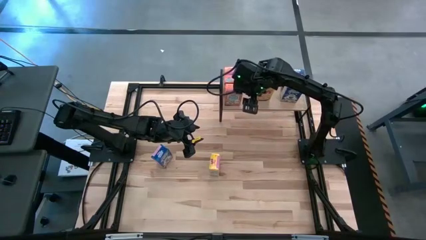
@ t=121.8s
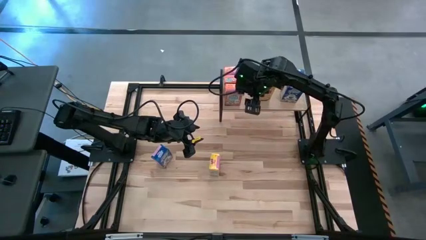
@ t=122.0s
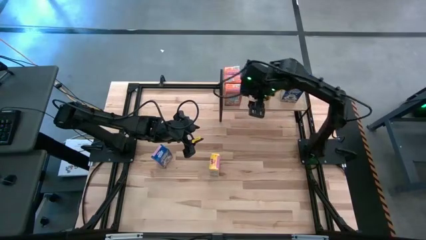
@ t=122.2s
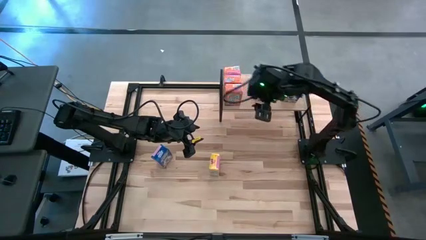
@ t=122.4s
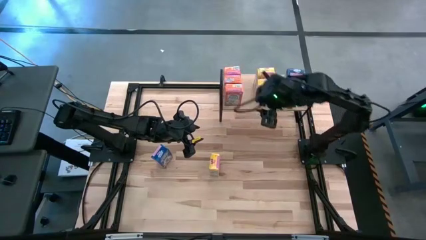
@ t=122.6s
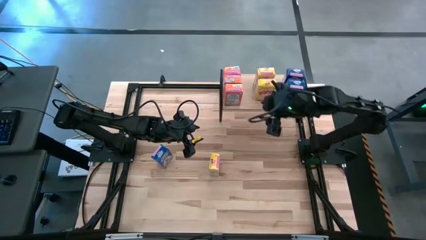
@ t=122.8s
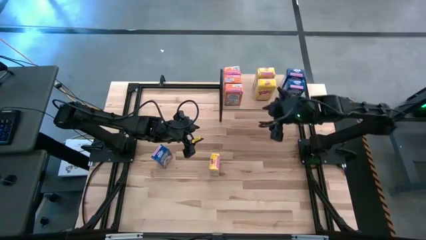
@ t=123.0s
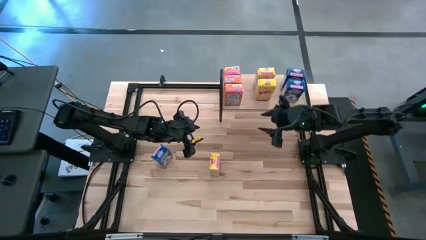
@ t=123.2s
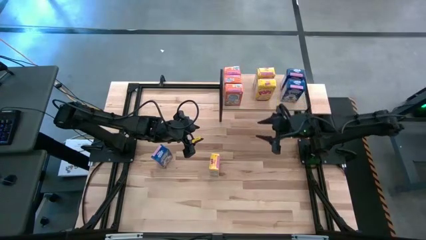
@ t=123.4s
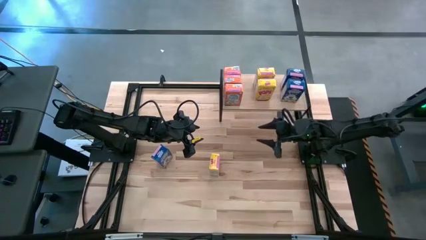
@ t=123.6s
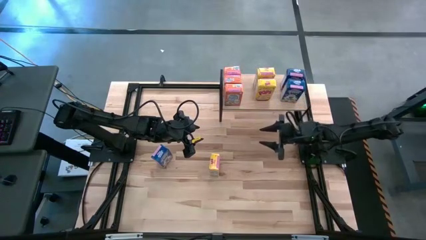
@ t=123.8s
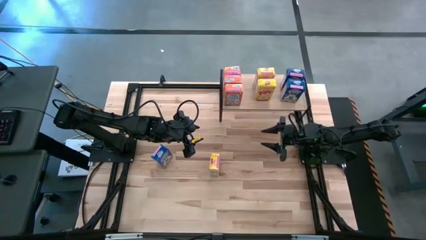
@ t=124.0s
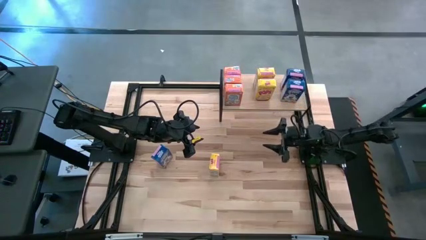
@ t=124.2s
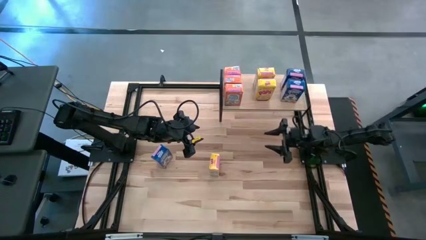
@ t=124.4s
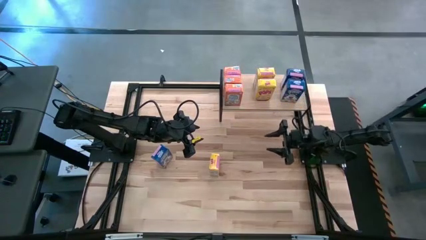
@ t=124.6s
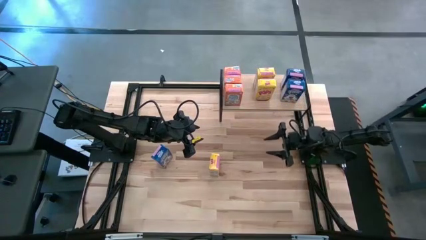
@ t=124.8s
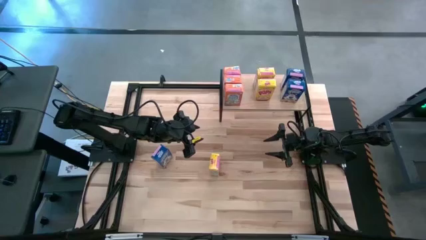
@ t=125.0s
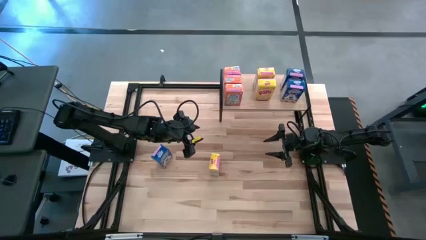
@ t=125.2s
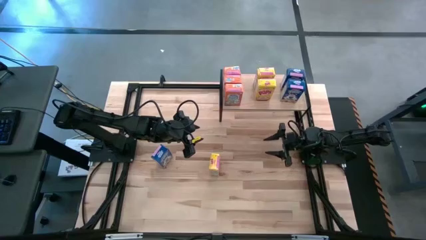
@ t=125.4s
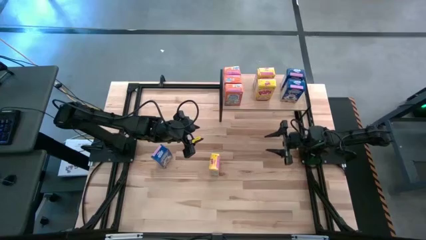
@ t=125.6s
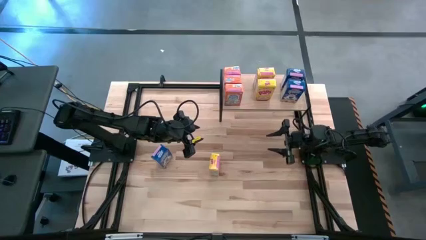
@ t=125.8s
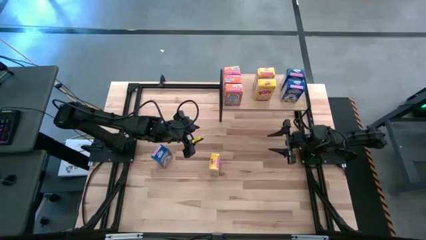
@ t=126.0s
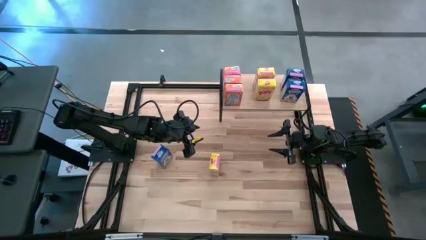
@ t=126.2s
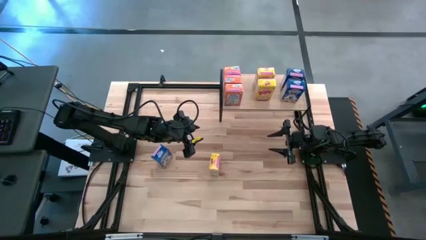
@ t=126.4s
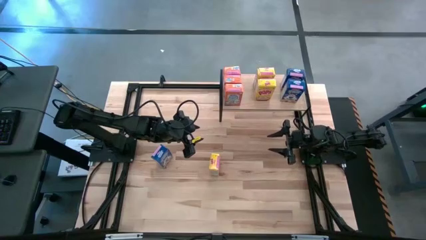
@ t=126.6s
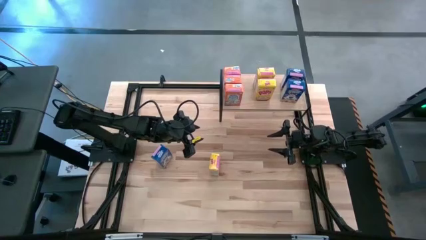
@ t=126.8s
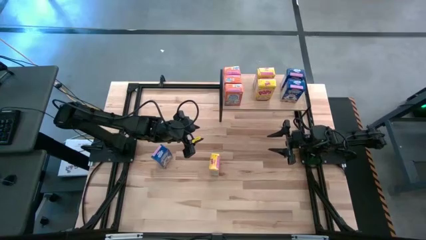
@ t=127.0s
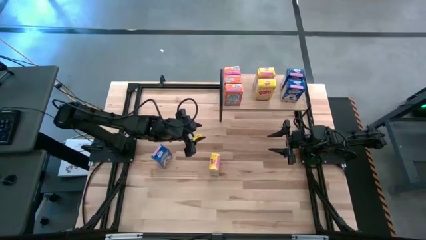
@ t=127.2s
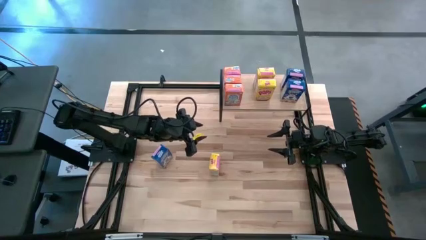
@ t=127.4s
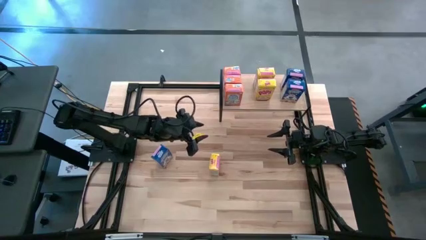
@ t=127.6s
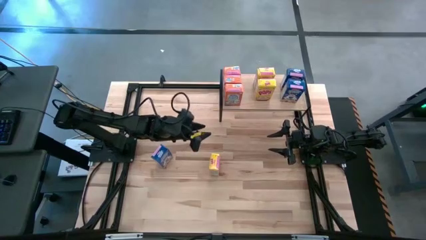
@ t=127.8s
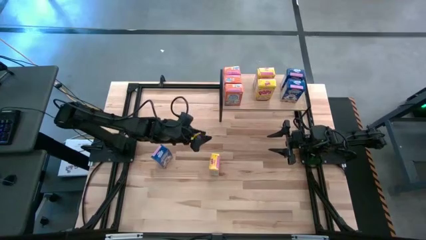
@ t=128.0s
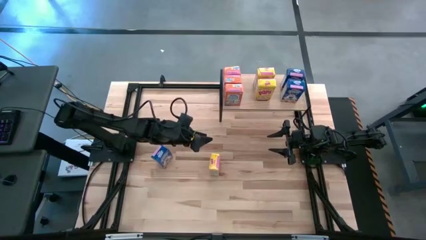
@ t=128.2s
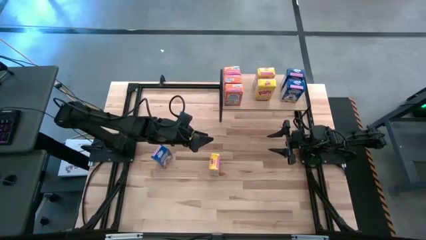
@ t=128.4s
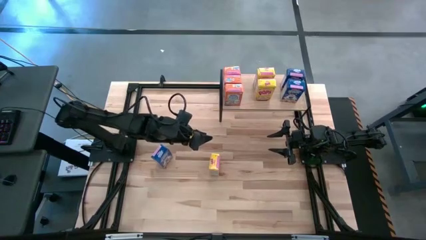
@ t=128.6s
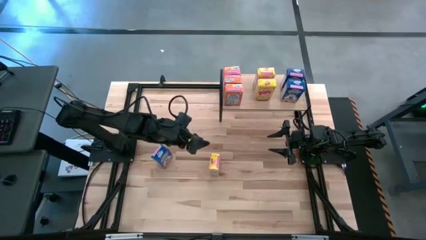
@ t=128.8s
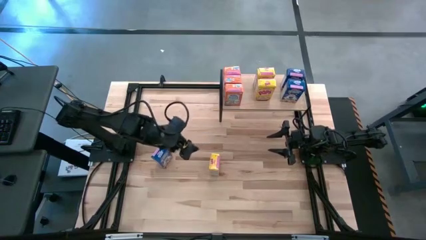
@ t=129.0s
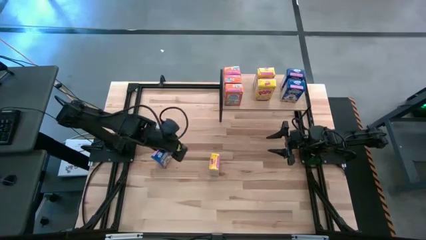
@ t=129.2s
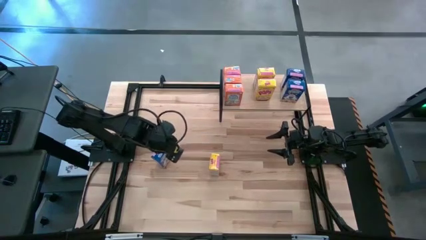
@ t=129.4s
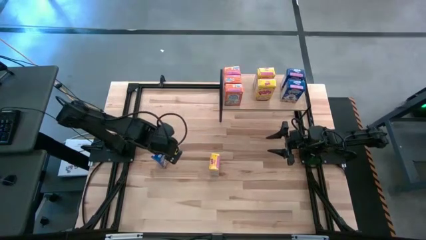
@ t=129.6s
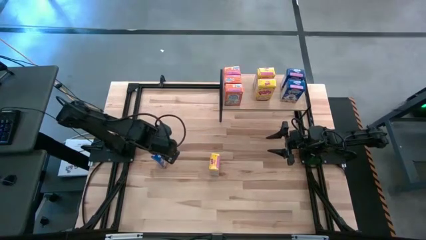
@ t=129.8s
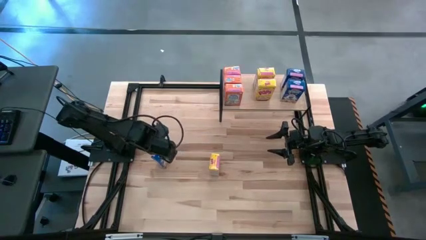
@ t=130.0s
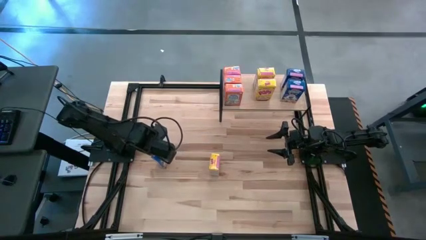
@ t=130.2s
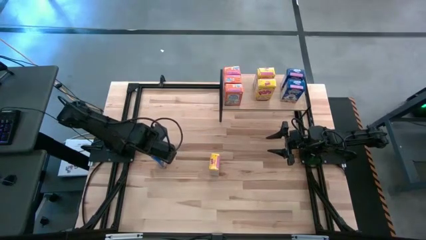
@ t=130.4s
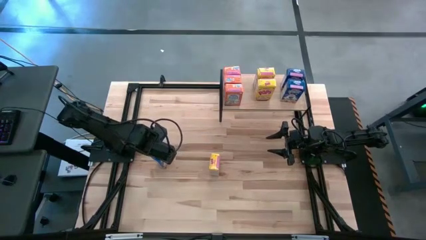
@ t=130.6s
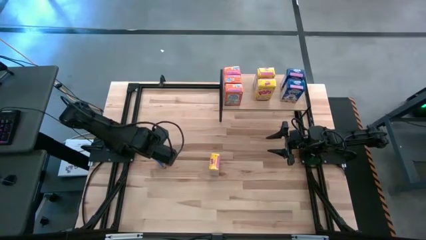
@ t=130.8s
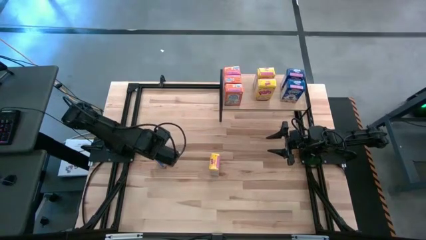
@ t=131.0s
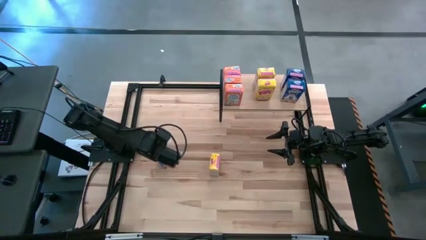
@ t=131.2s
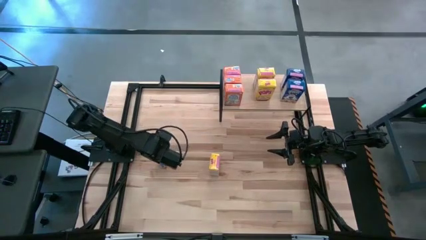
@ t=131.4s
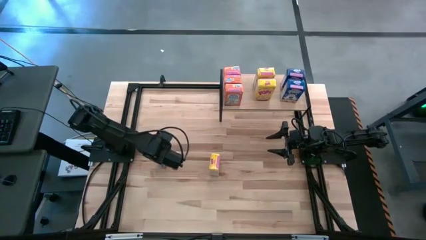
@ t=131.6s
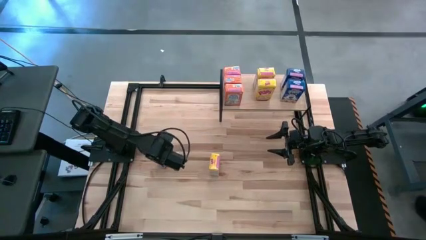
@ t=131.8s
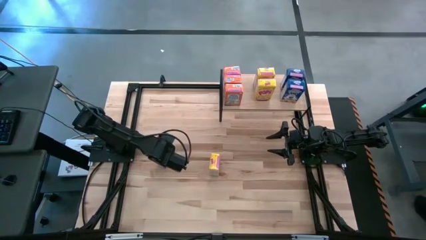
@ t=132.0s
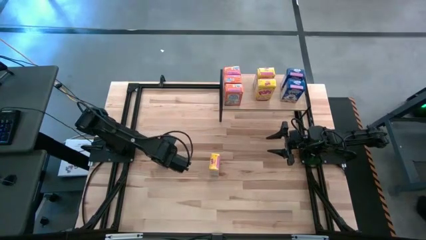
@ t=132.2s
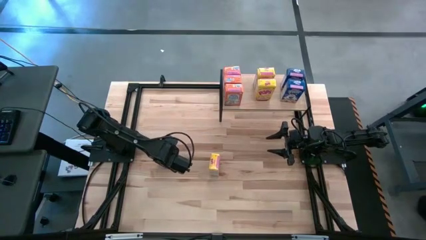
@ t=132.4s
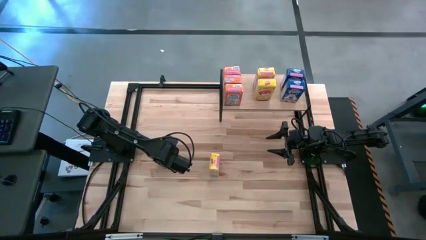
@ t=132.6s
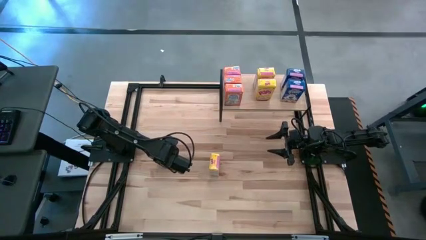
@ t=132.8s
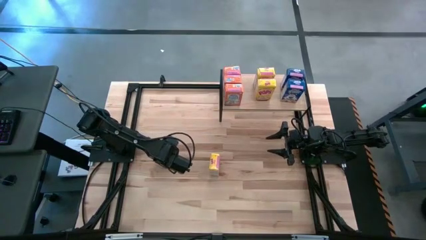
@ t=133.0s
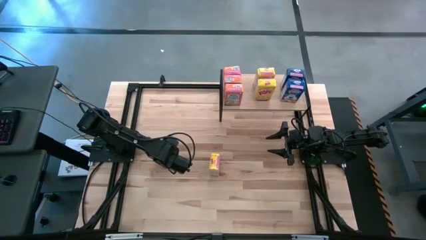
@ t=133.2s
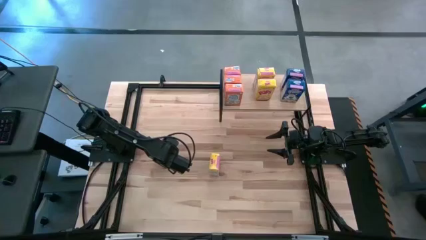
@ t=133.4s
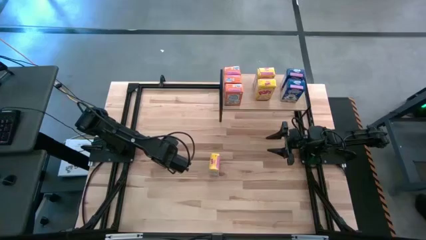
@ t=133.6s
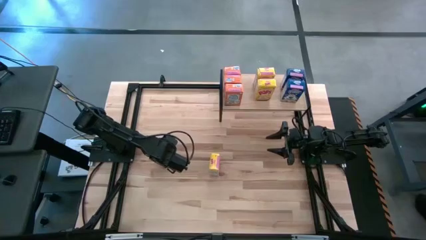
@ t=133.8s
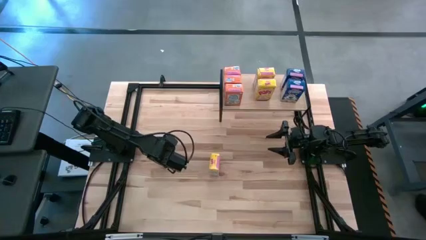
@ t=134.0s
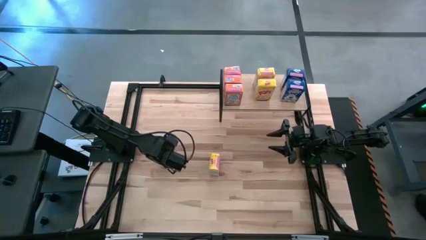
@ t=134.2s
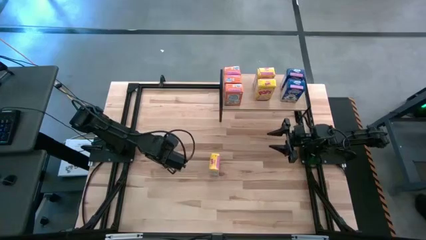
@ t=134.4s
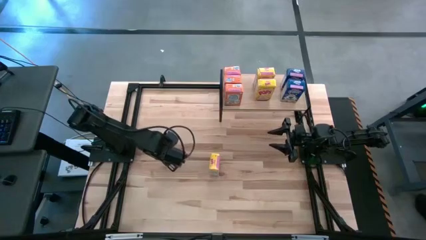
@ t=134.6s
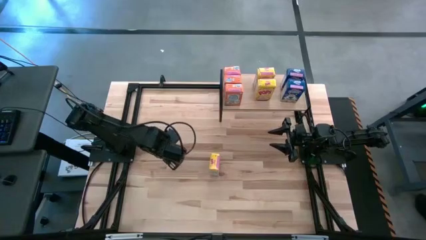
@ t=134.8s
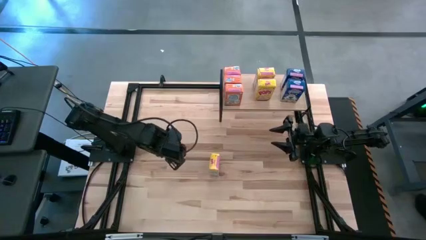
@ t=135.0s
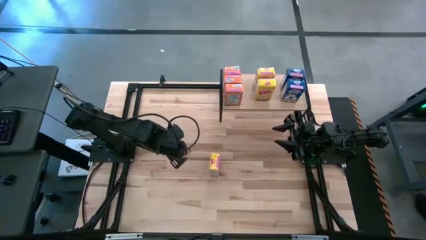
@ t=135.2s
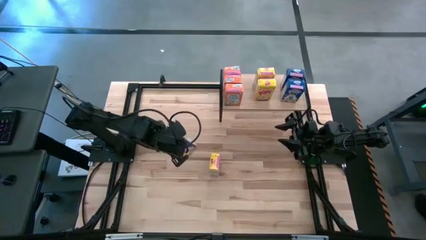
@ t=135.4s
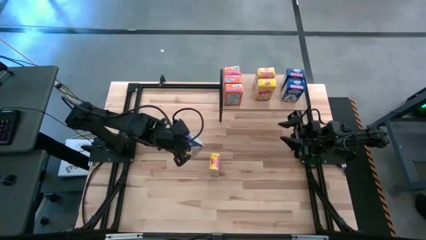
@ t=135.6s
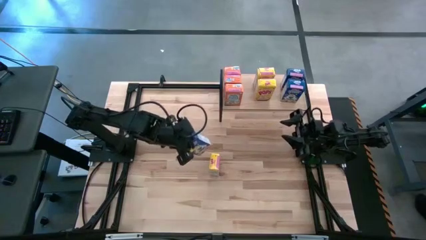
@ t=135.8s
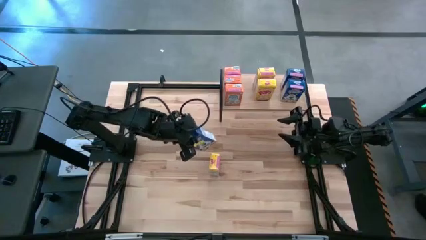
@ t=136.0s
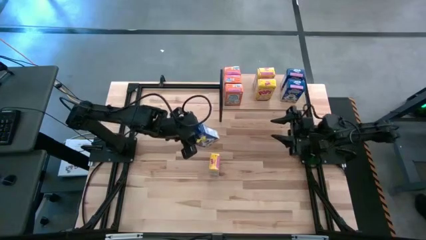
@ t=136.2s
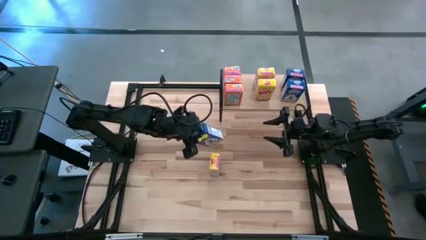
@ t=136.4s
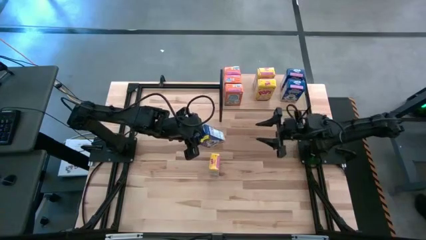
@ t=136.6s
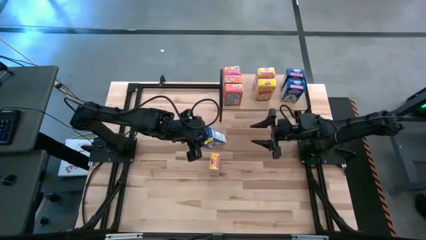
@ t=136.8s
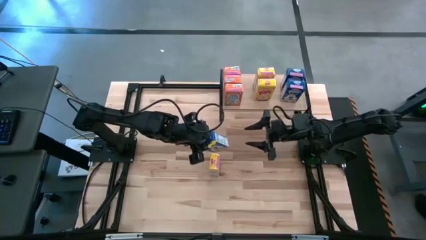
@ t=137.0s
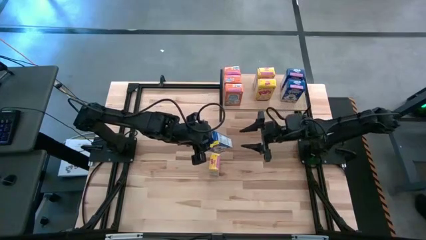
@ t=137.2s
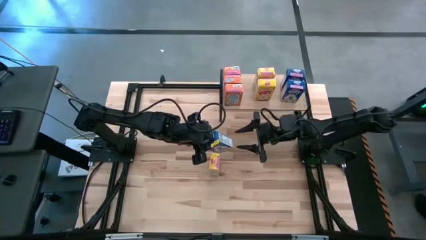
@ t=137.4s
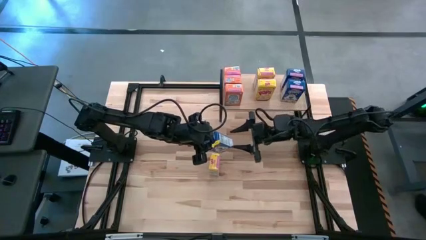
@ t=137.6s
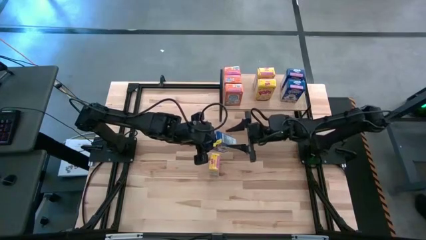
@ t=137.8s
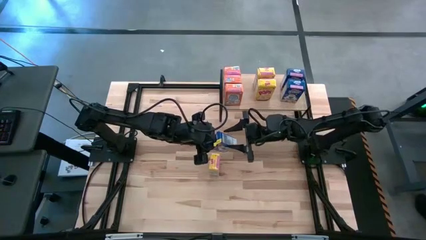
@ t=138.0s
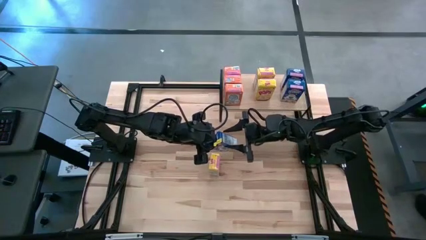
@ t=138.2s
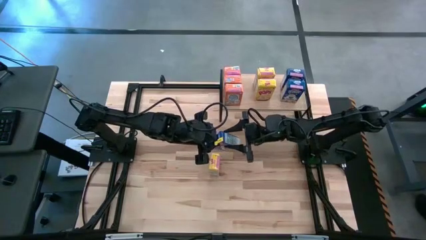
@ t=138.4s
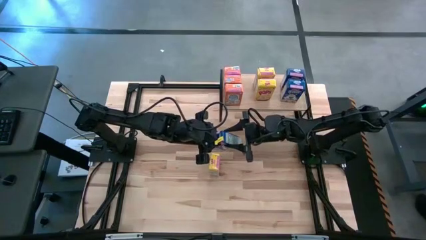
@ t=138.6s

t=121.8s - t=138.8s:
Task: Stack cereal on shelf
Put the blue cereal box on the shelf aligned with the blue cereal boxes

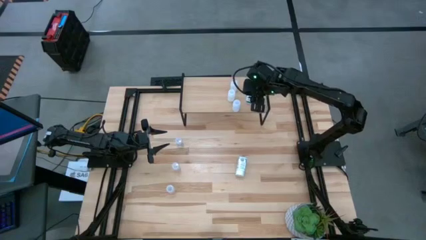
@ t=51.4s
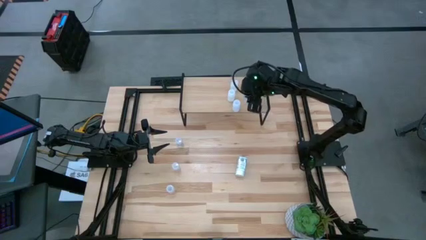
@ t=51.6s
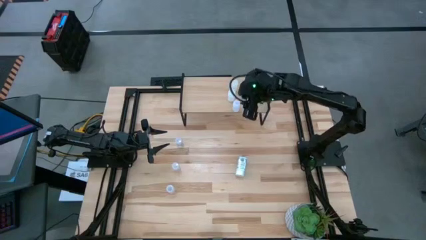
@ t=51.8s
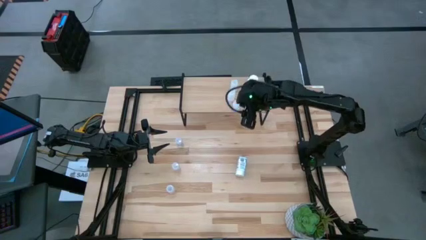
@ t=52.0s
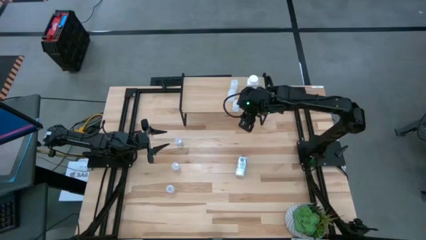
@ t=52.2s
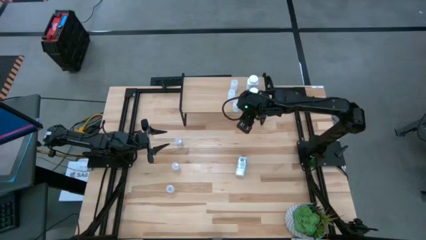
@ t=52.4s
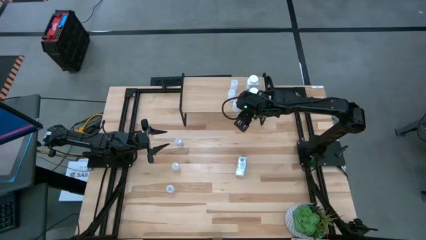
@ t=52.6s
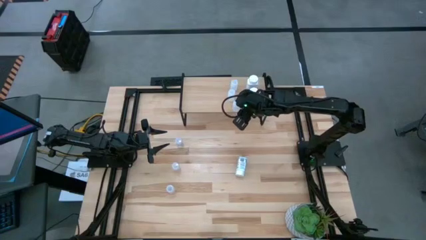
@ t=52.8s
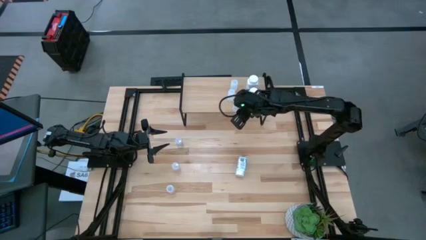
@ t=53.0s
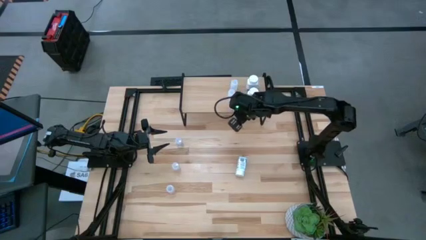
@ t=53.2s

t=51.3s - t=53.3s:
Task: Pick and place medicine bottles onto shelf by color
Adjust the small white pill bottle on the shelf
